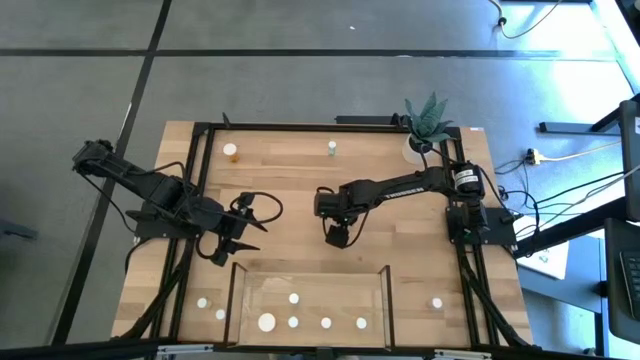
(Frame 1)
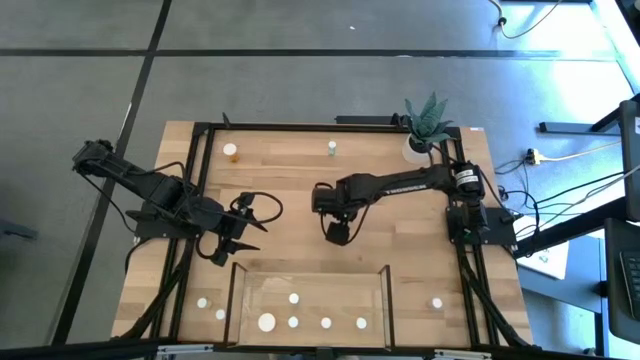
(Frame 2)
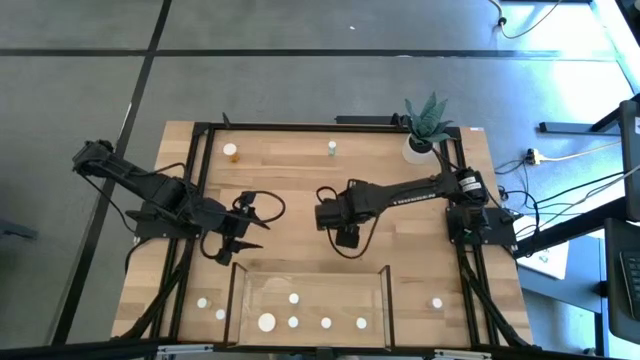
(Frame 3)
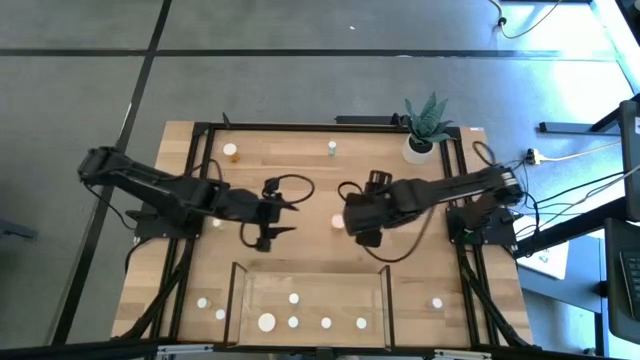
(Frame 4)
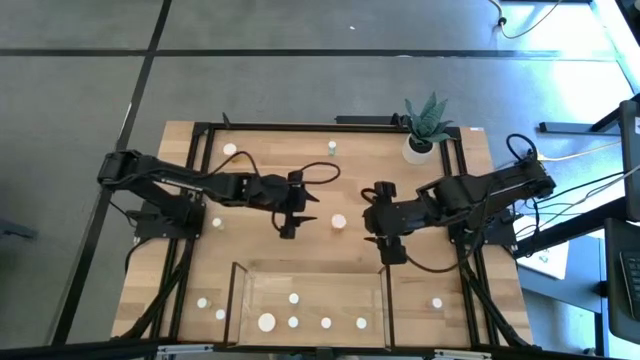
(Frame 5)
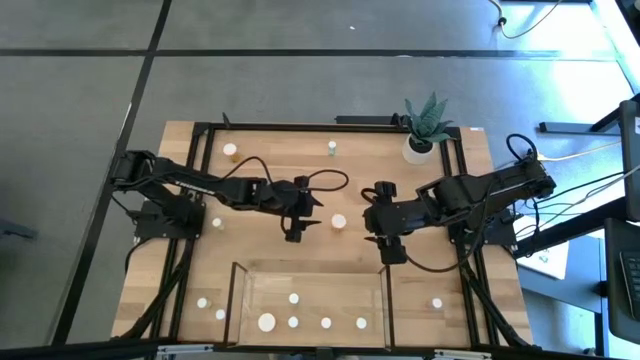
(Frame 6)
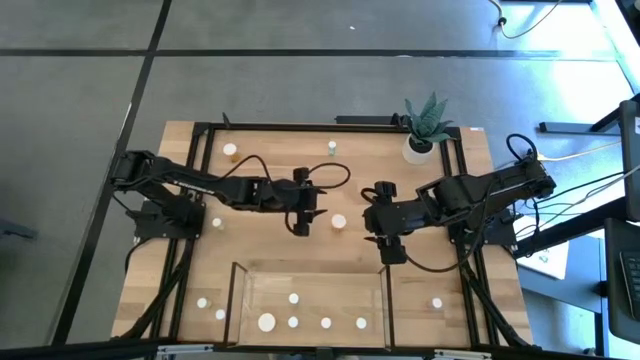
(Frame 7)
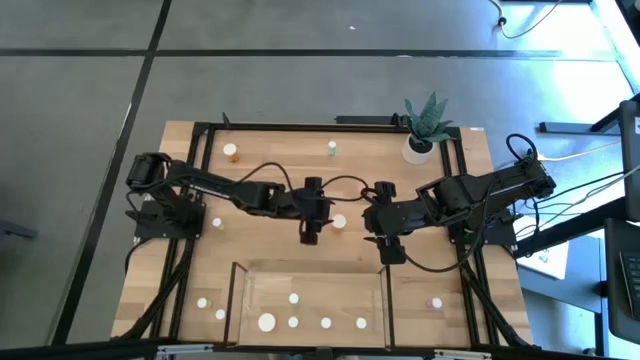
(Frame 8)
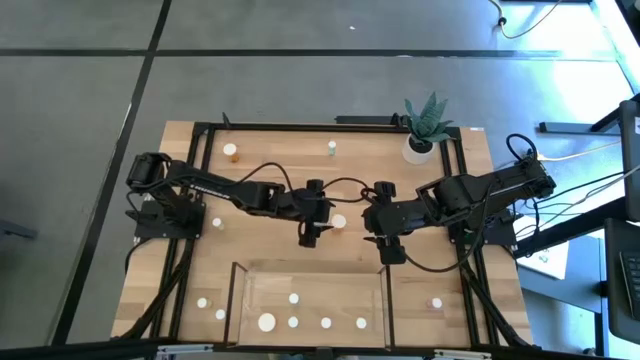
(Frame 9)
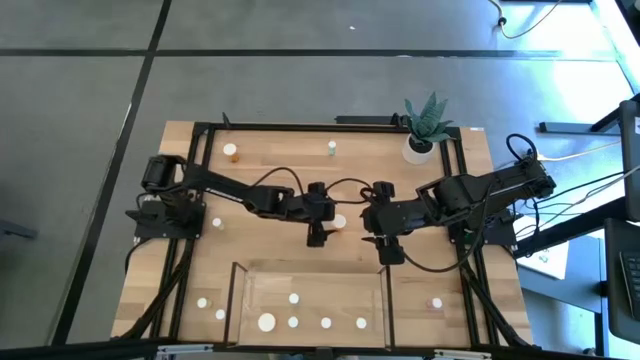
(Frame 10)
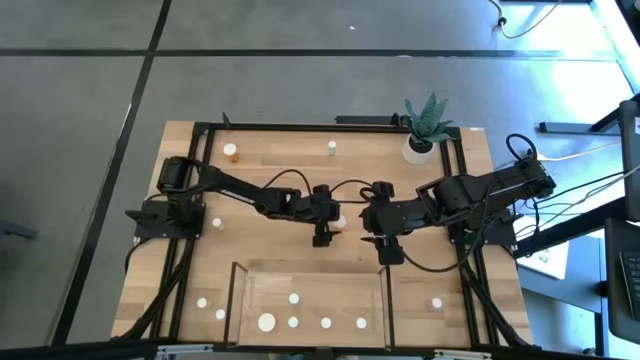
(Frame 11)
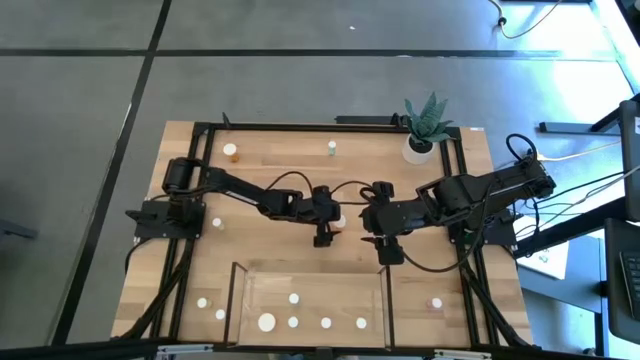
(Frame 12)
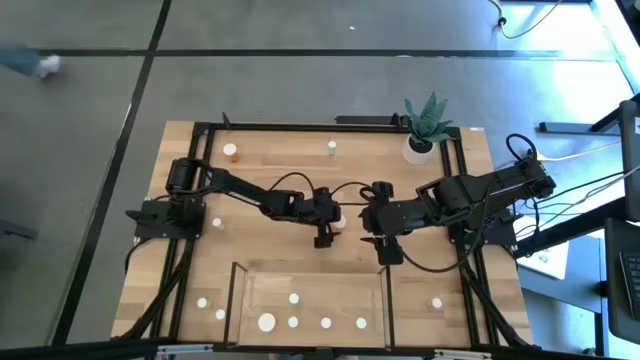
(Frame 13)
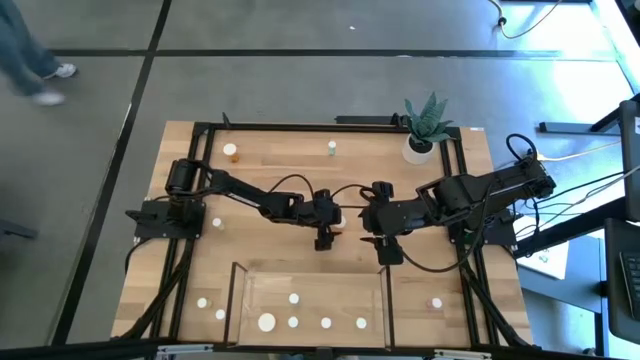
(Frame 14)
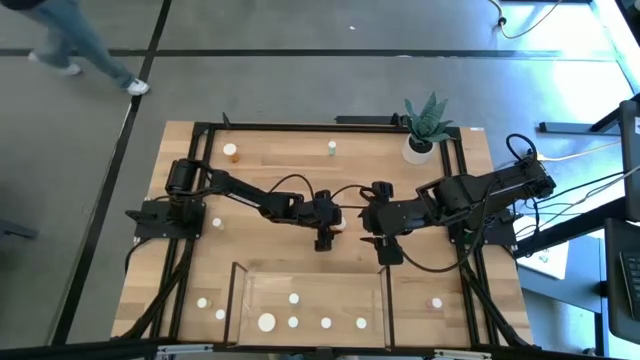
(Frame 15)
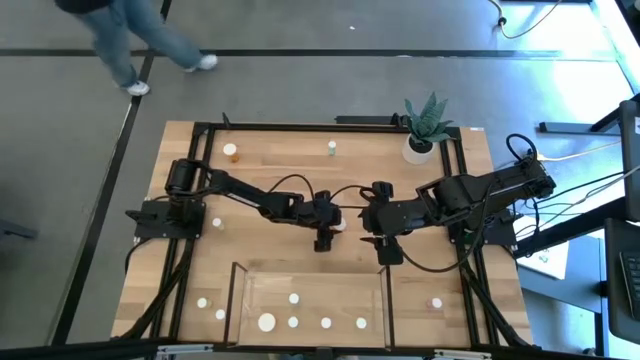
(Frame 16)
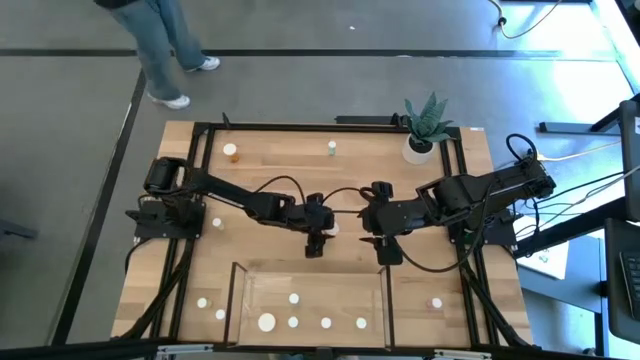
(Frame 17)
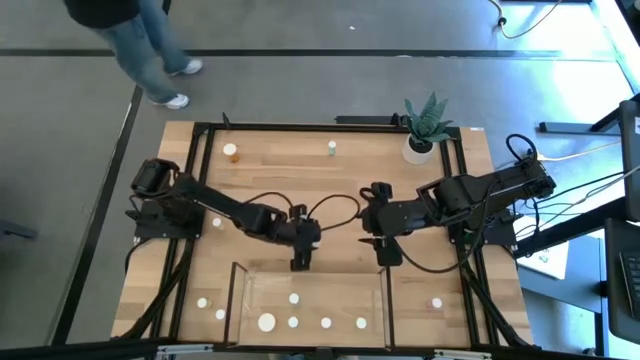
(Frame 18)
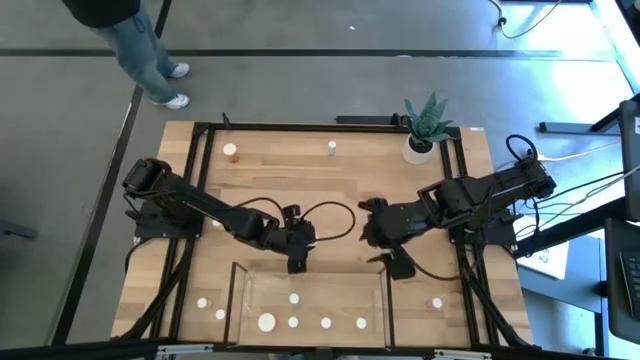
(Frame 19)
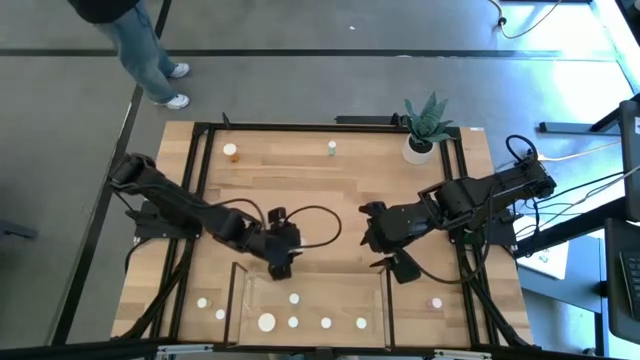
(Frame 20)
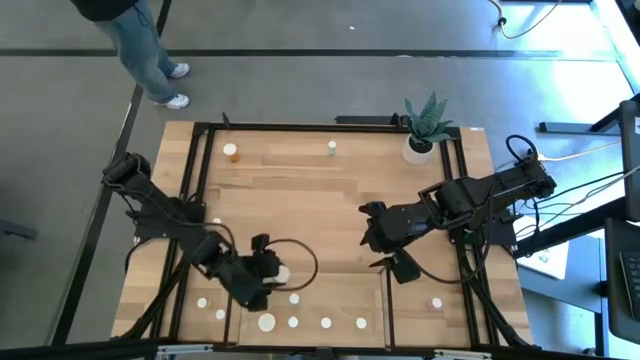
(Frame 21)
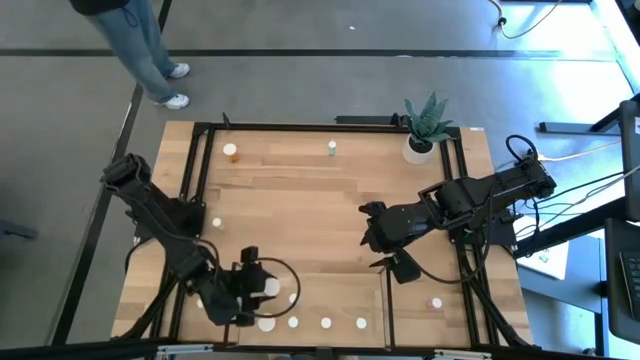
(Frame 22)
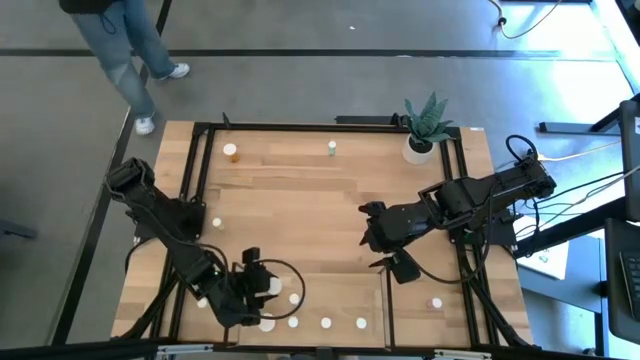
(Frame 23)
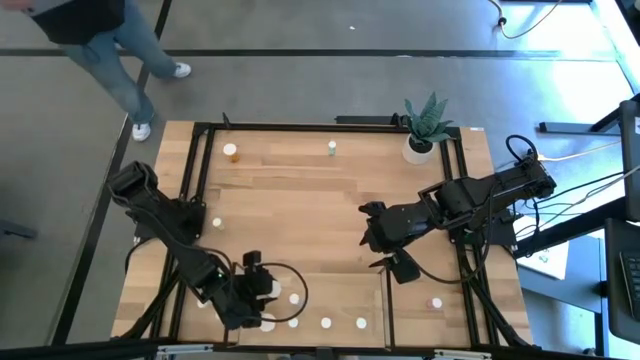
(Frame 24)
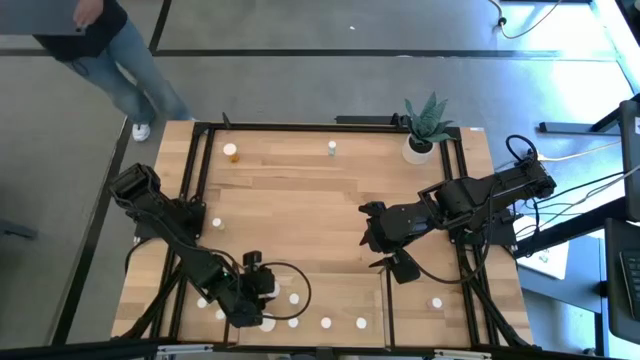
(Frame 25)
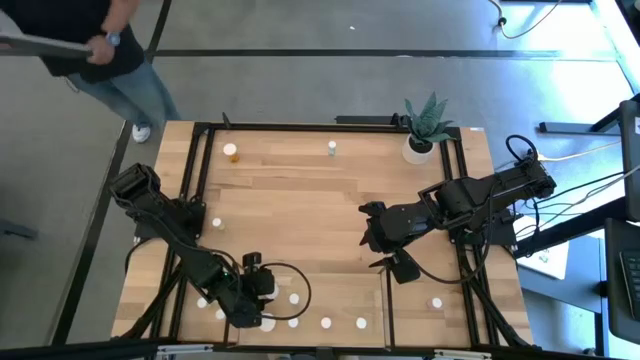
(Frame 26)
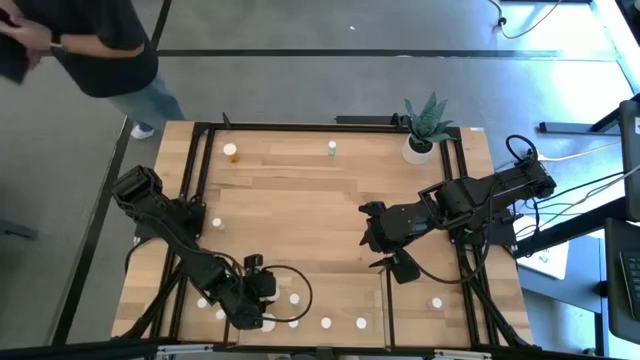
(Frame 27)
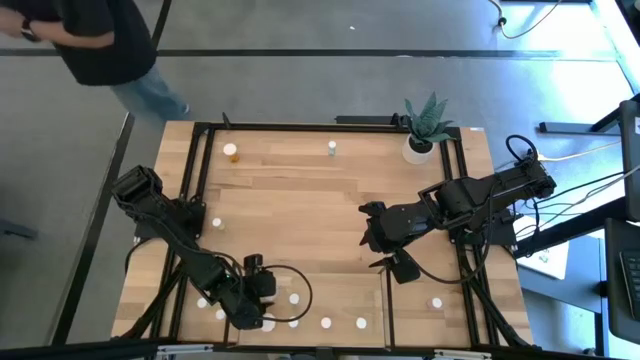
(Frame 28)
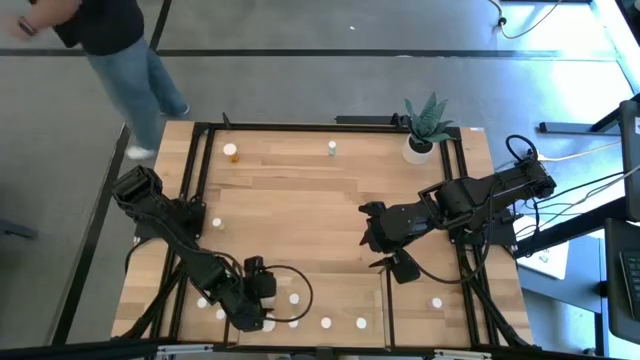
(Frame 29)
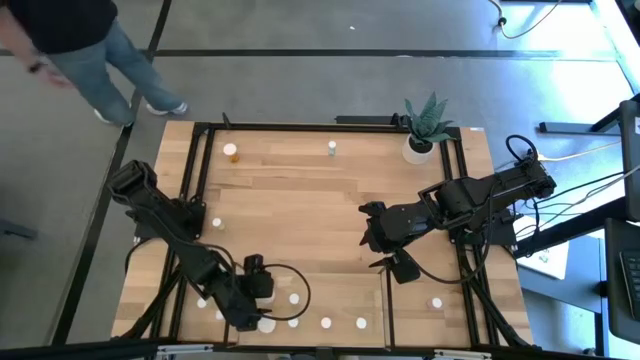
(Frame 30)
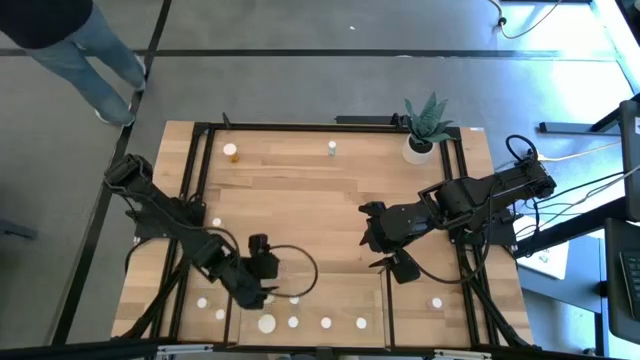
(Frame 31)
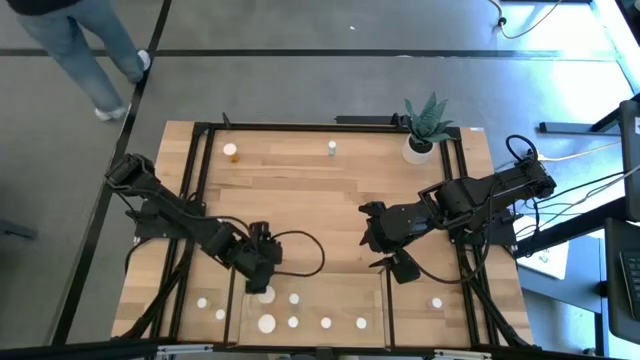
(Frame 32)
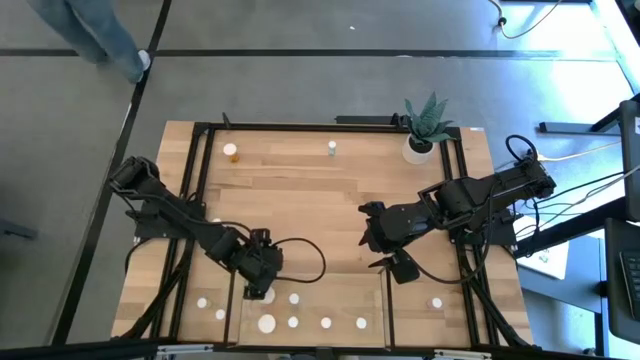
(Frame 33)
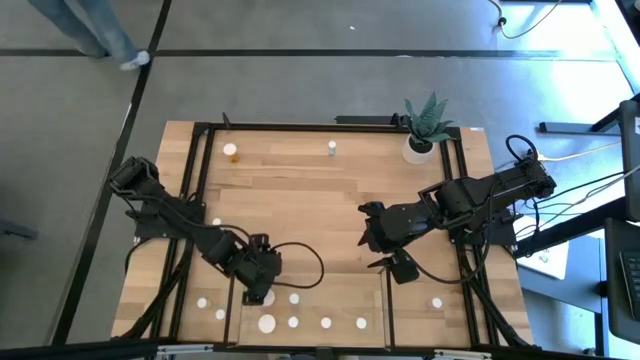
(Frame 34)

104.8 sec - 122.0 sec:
Task: Pick and place medicine bottles onto shelf by color
Put the bottom orange pill bottle on the shelf aligned with the other orange pill bottle

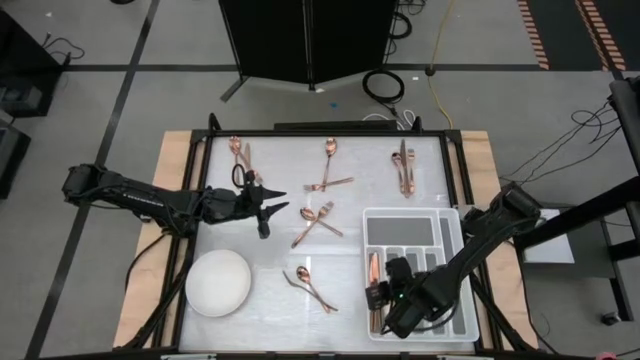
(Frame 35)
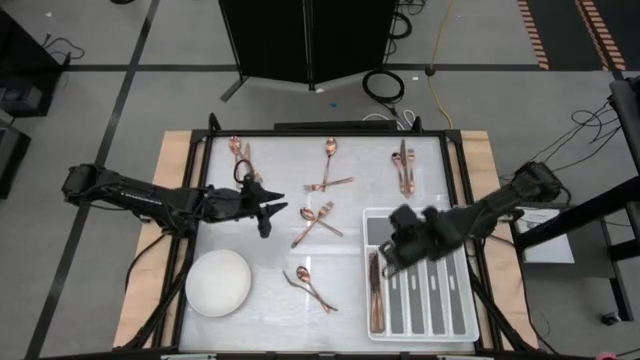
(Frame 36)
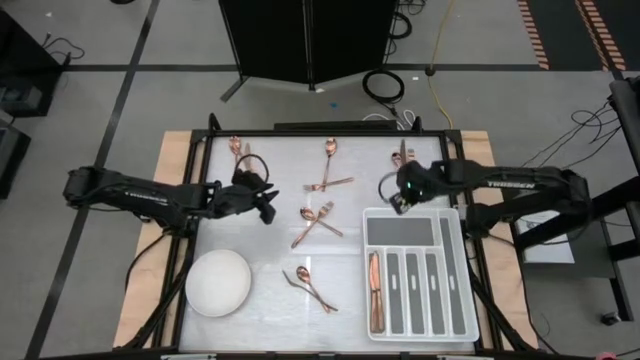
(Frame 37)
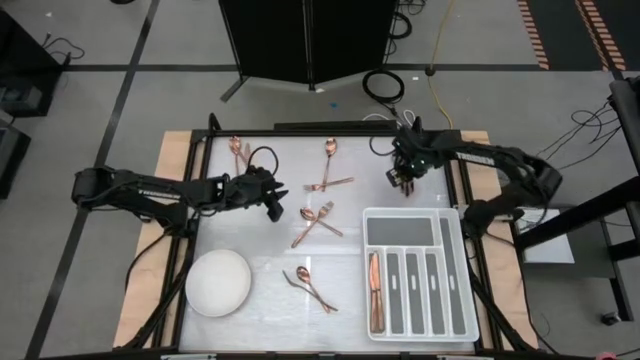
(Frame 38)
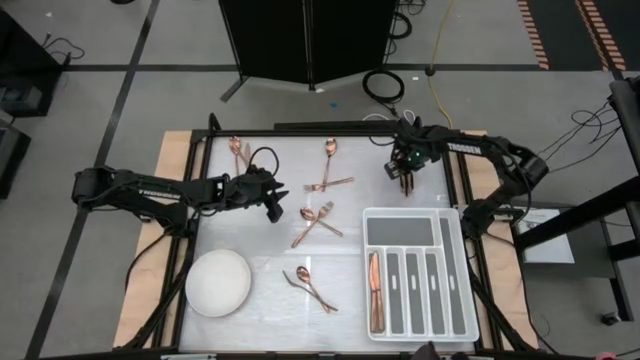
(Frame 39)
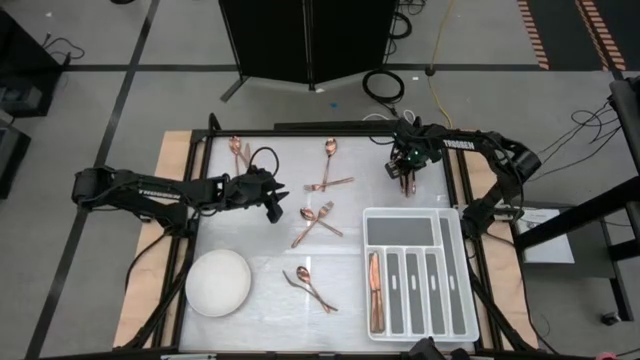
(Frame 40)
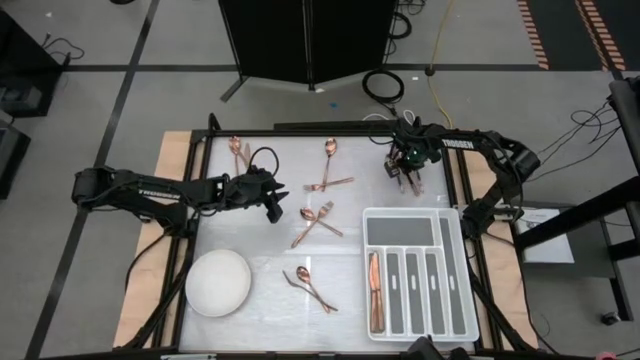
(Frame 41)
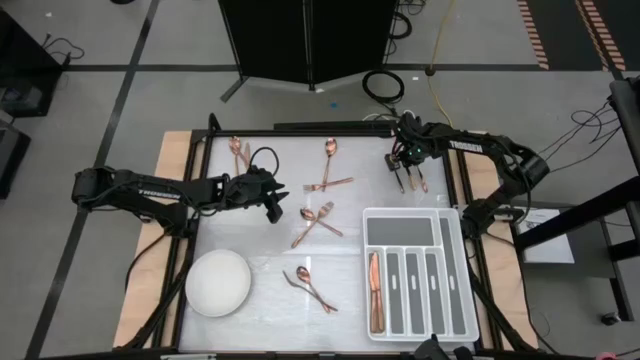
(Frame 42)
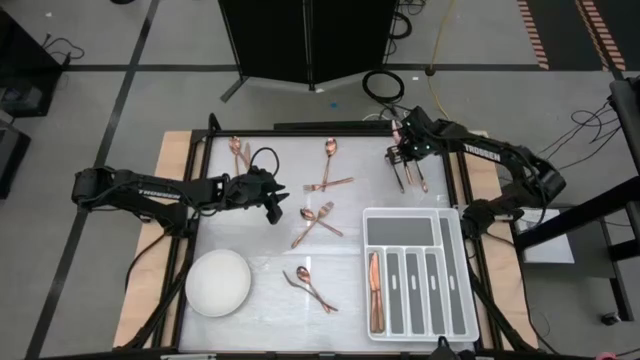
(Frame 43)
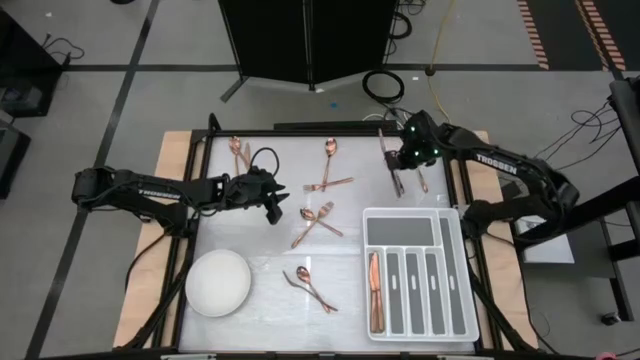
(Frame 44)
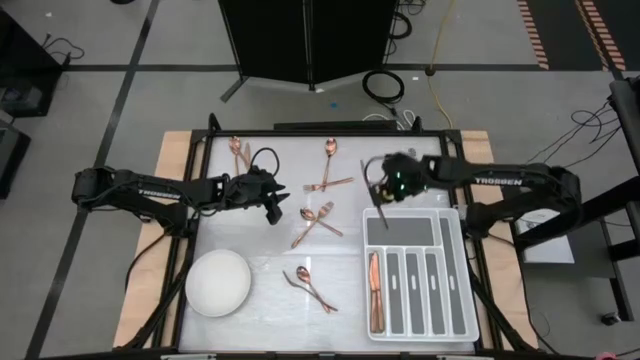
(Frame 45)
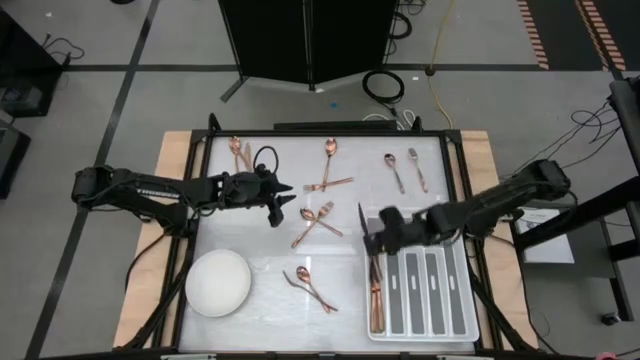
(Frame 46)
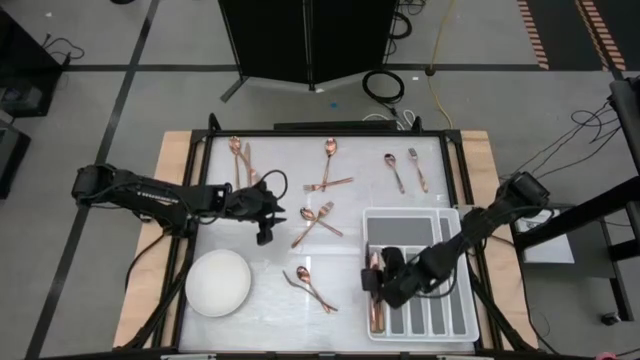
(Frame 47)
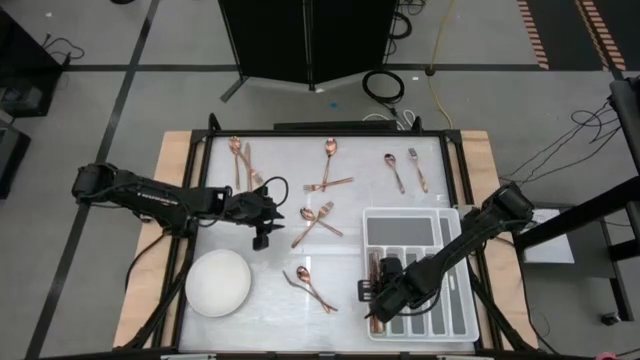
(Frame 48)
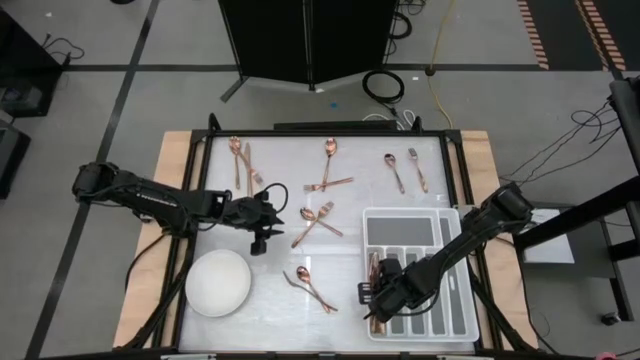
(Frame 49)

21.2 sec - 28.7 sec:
Task: Sort silverware
Put the right brown knife in the white silverware organizer
